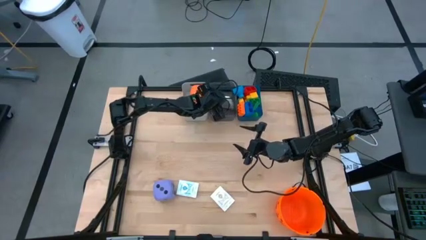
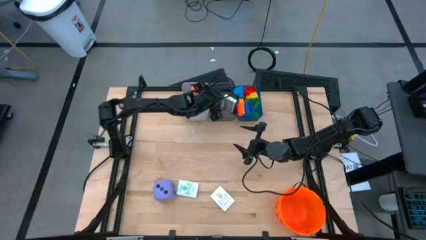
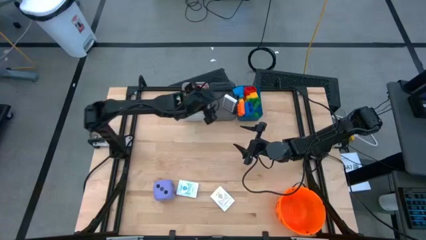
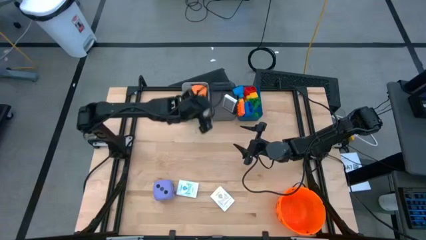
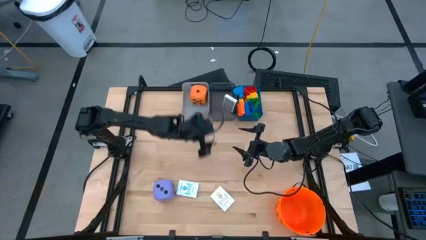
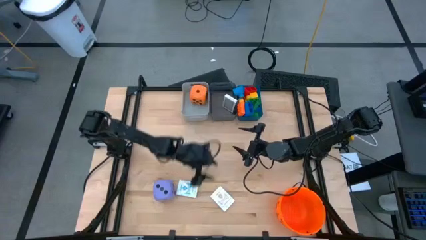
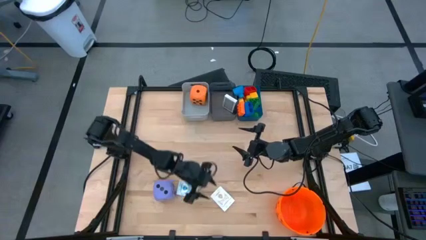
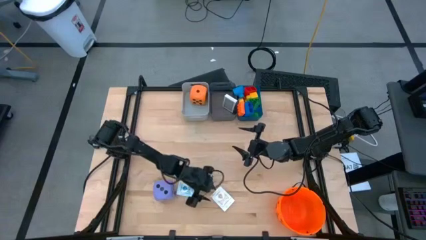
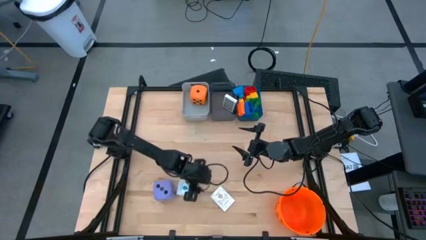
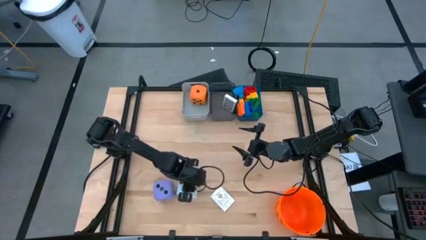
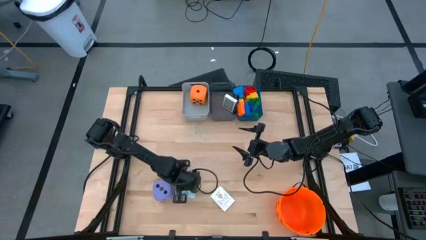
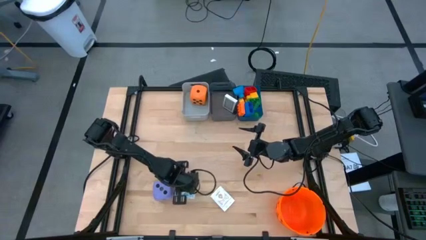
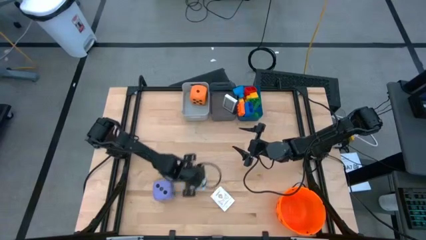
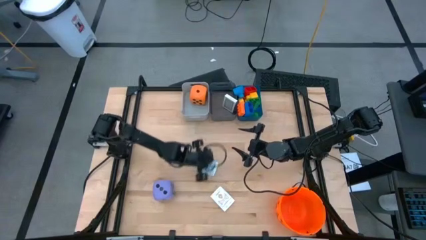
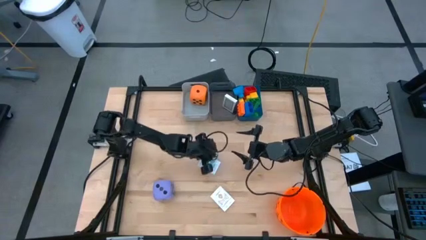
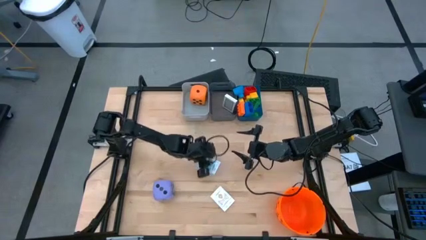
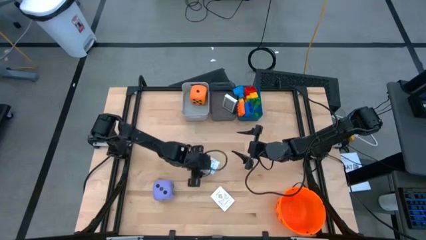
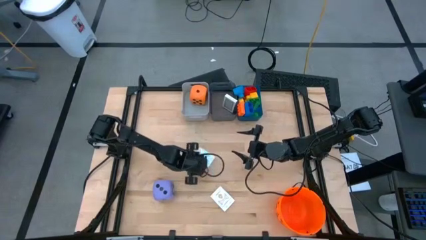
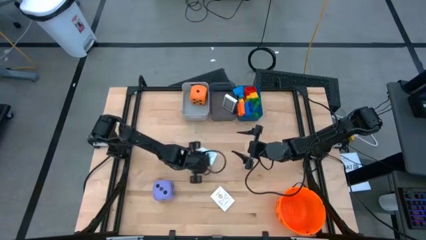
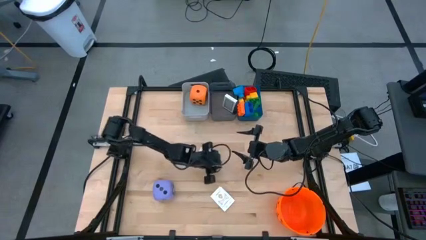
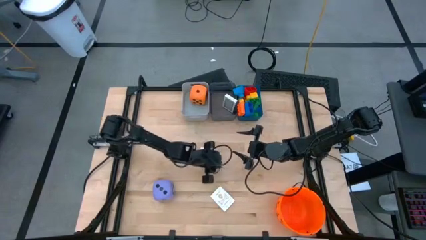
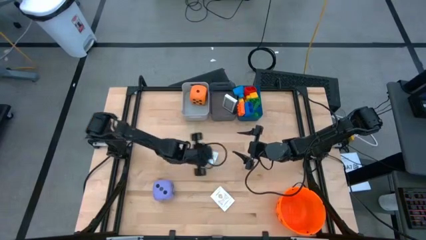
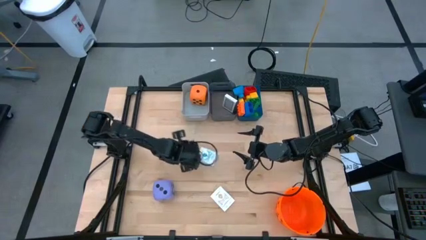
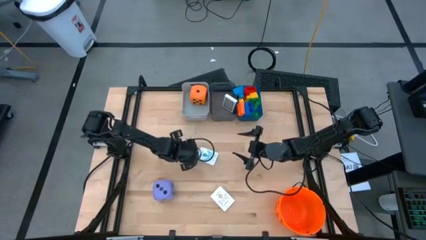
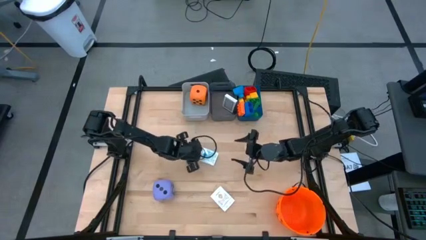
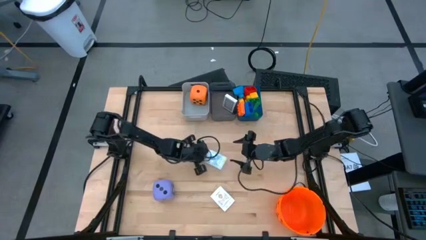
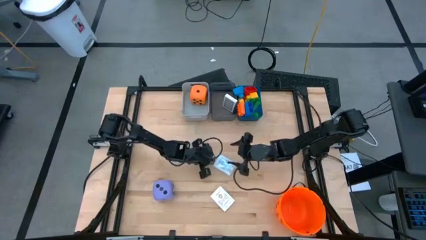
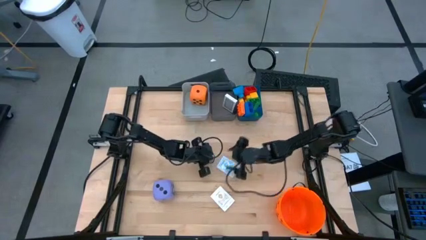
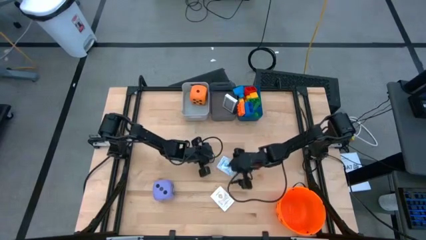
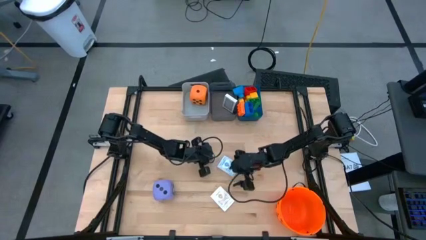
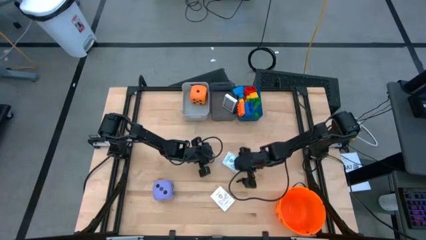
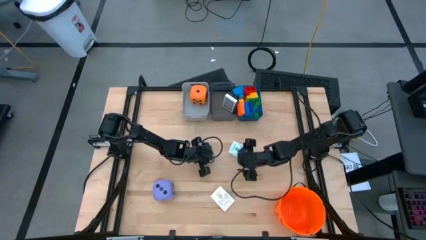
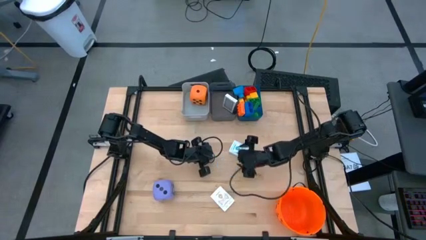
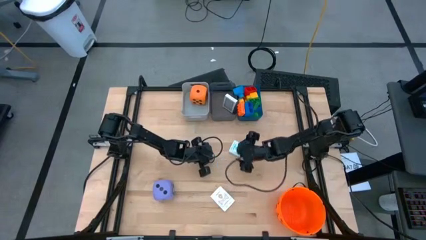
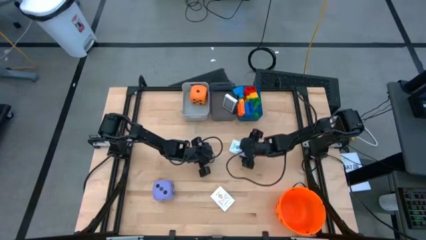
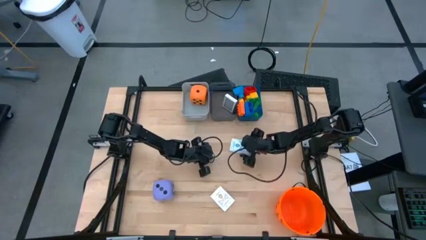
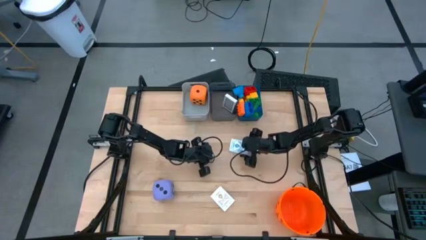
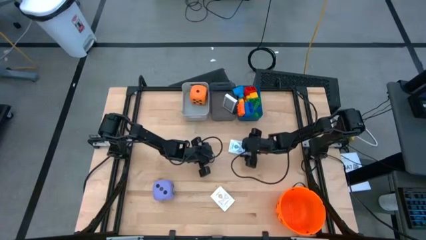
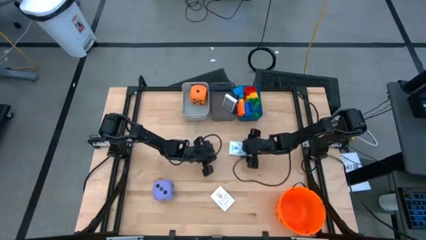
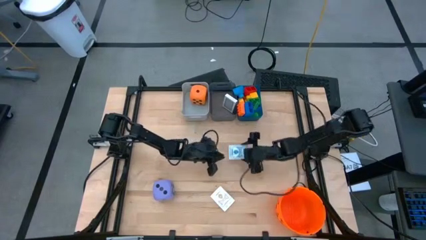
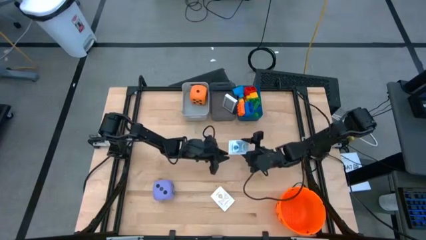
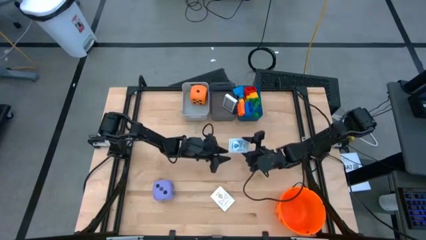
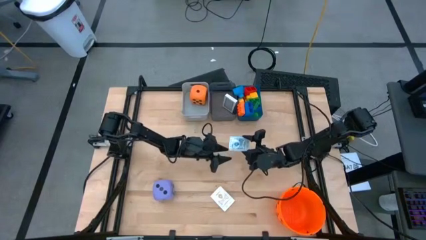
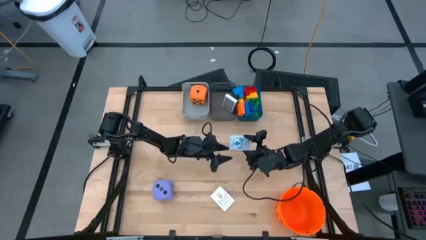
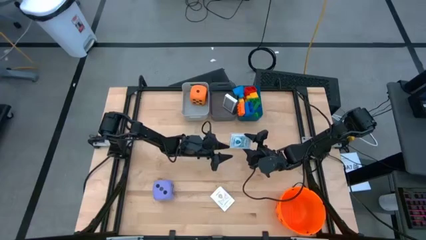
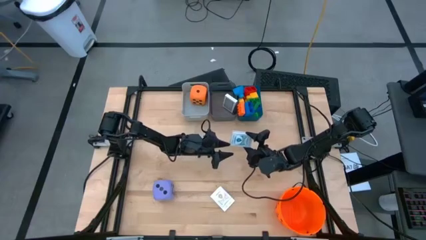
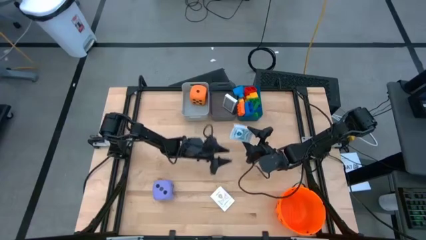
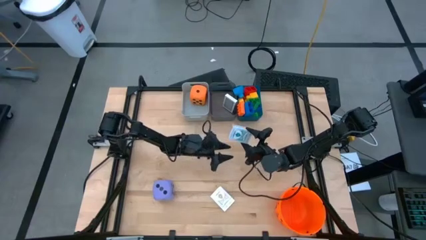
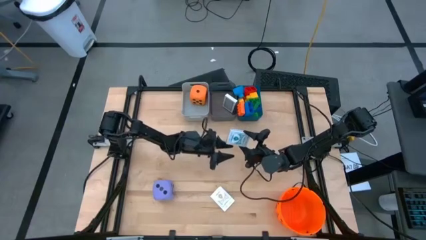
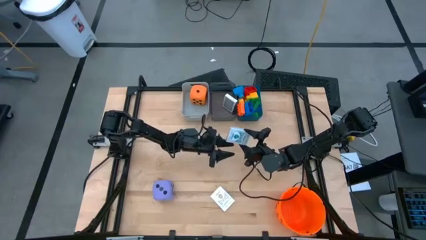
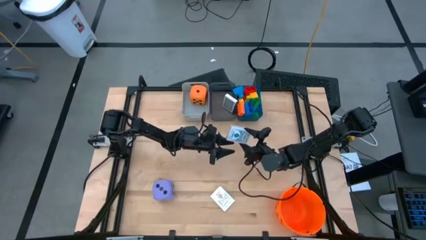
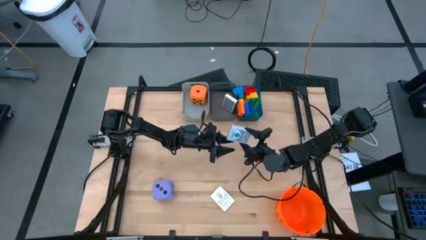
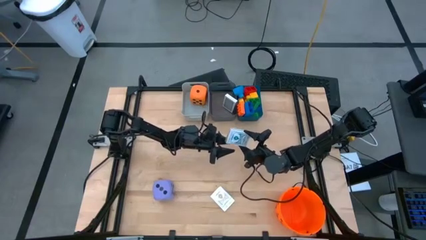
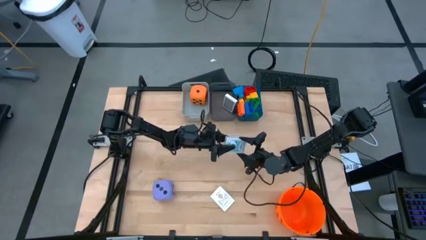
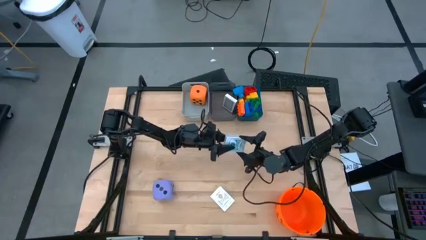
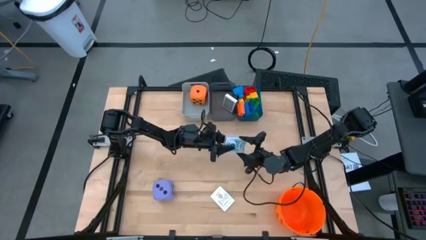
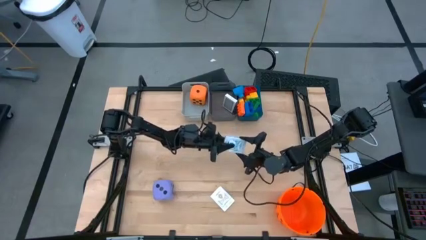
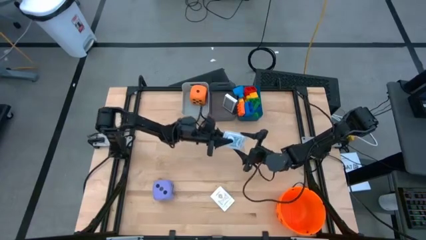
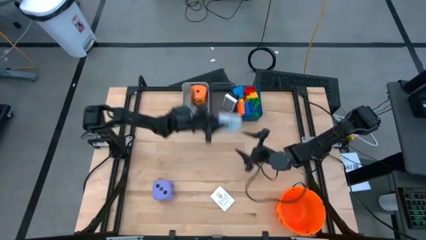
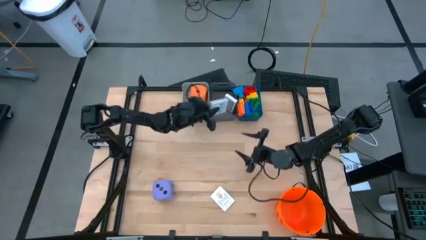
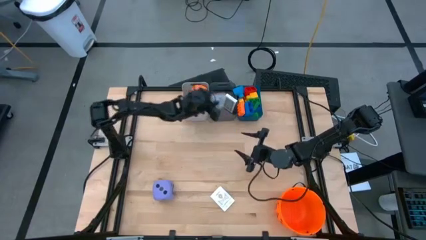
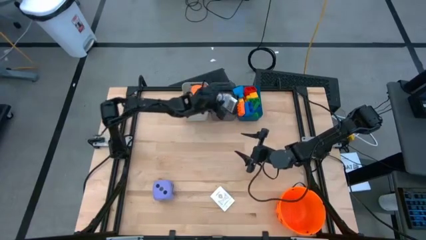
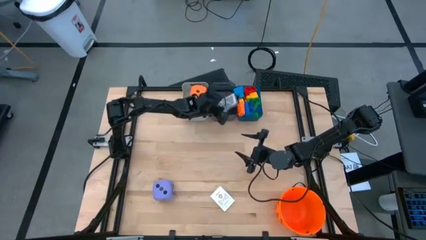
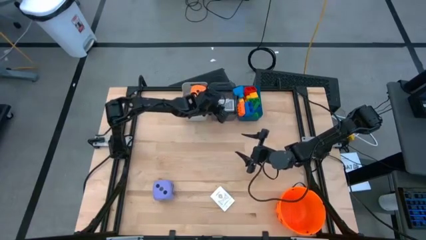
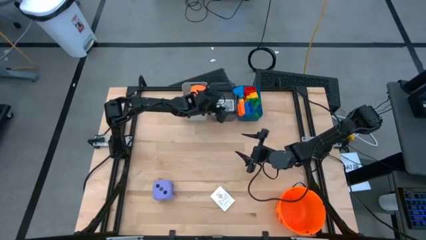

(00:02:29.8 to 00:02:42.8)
Task: Pick & Place Toys
Put the blue playing cards into the black bin

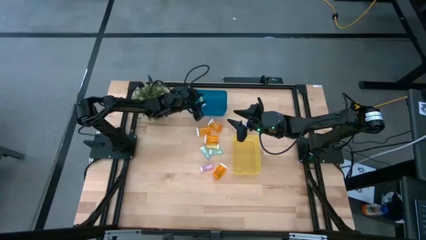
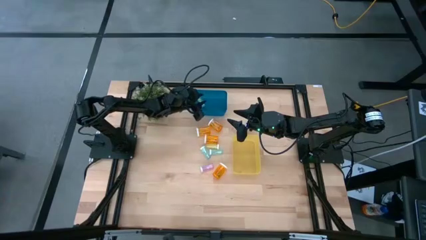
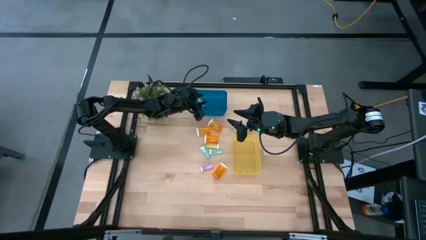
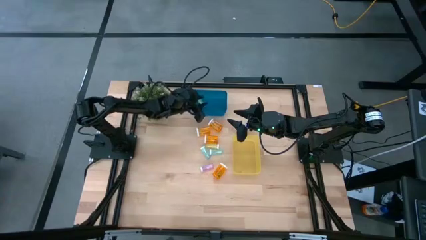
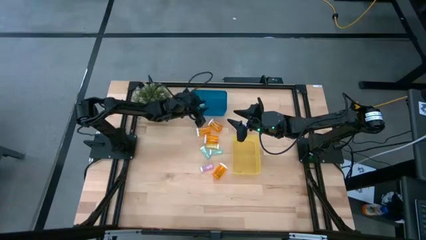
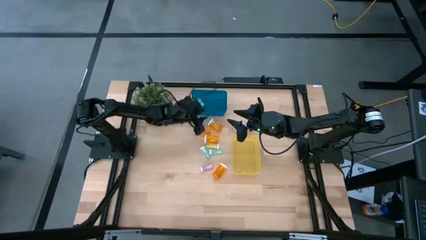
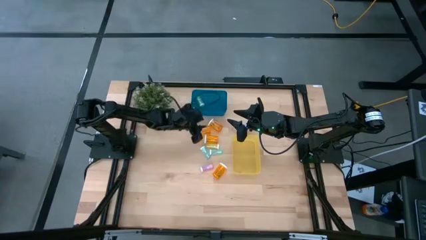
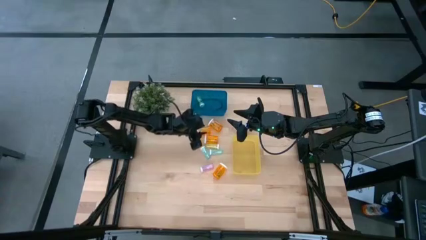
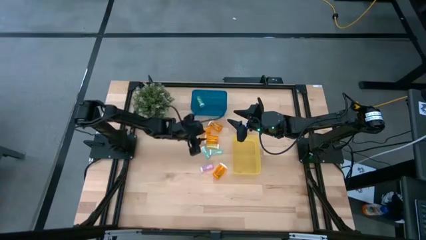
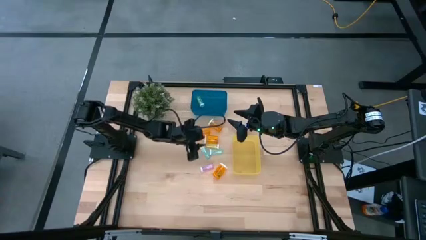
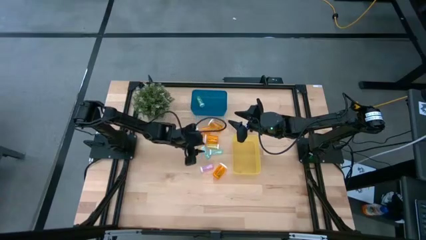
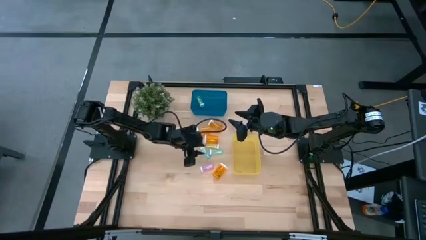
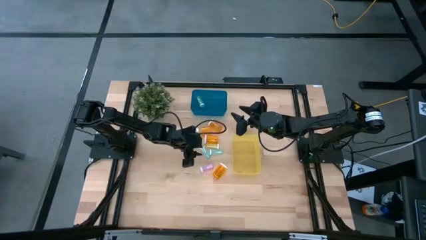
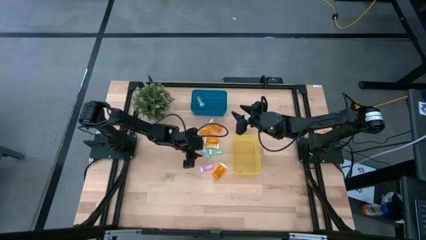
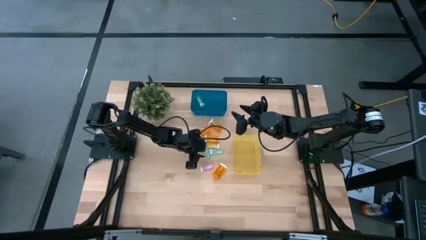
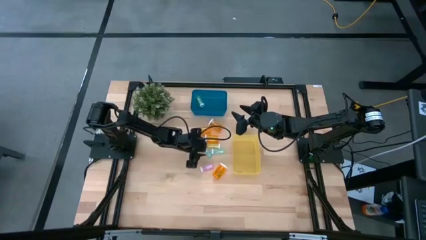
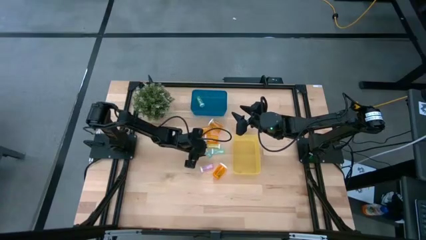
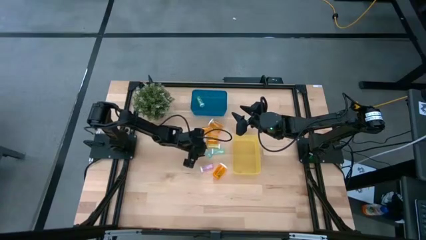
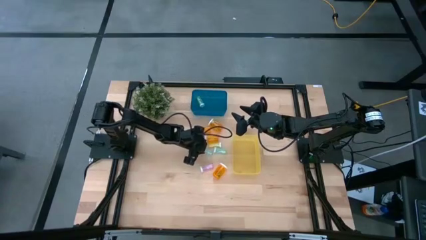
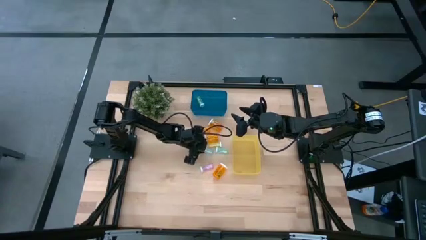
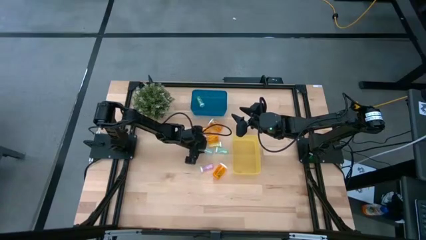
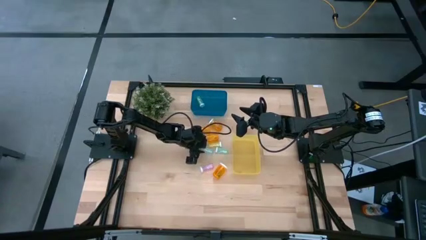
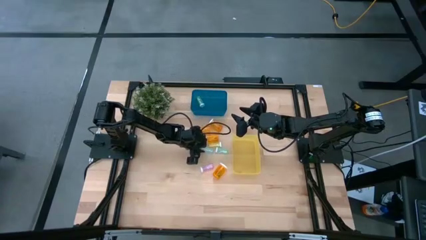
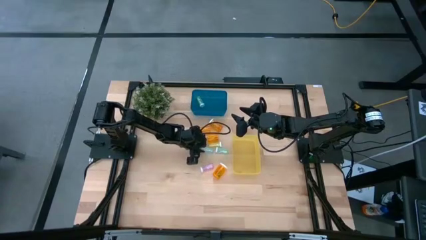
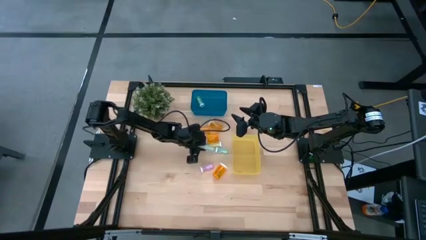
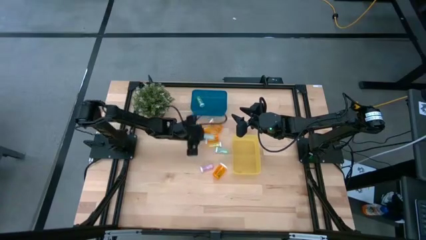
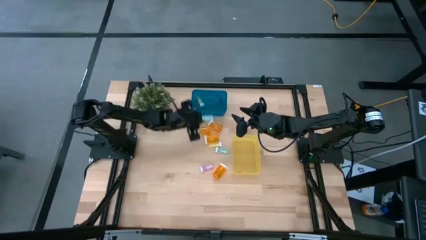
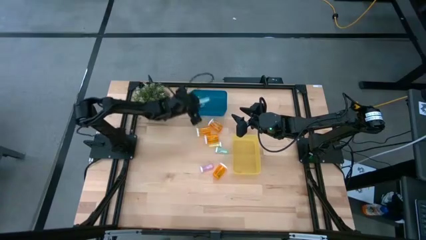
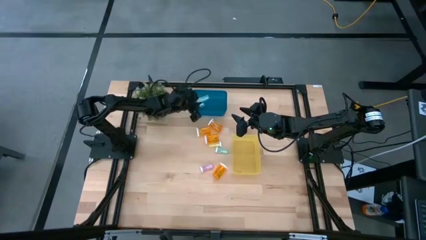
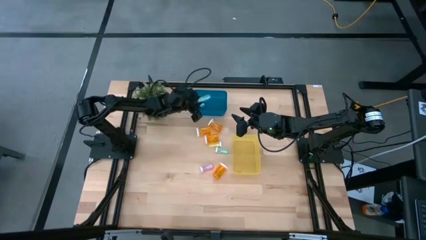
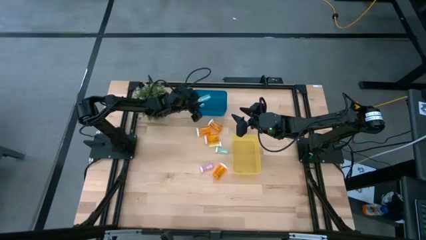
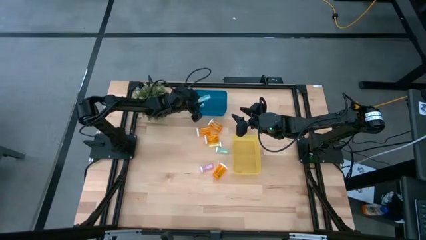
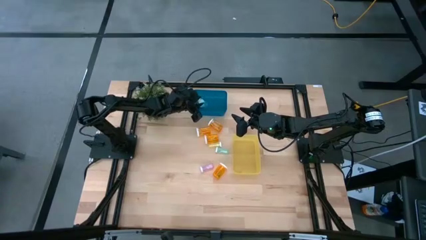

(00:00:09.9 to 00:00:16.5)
Task: Pick and place medicine bottles into bin by pill shape (circle, oval)
Put the left small blue pill bottle into the blue bin
